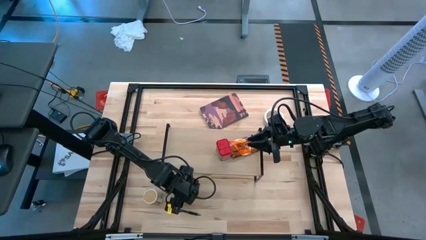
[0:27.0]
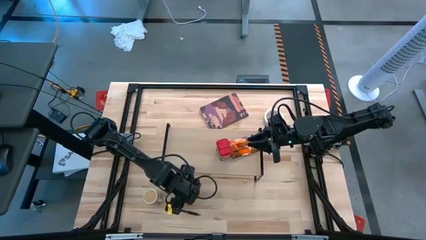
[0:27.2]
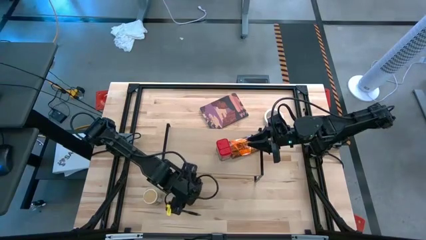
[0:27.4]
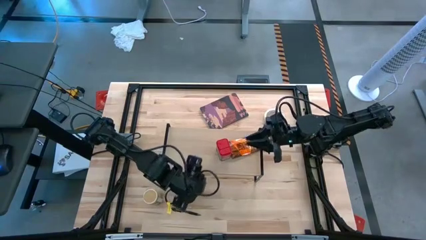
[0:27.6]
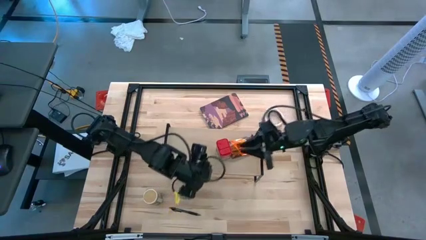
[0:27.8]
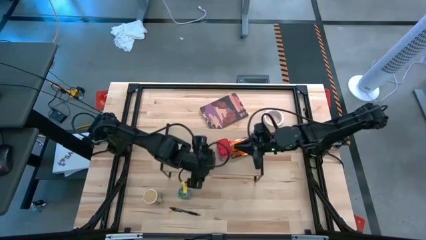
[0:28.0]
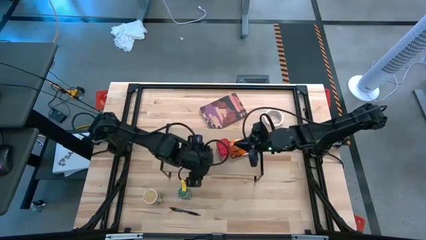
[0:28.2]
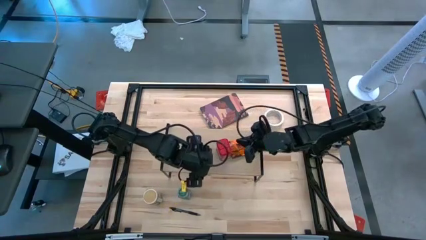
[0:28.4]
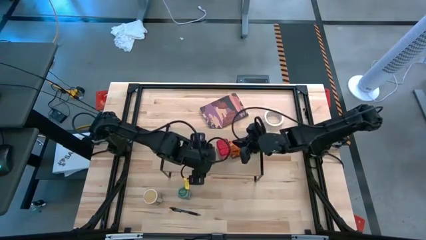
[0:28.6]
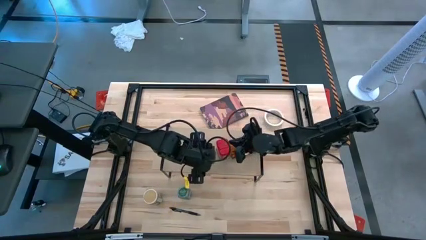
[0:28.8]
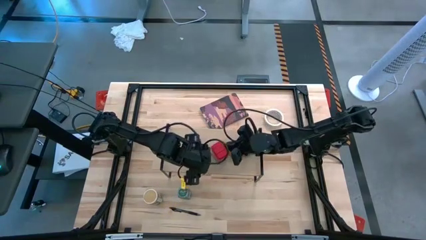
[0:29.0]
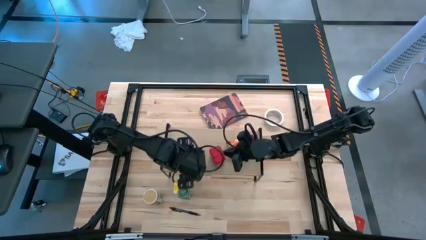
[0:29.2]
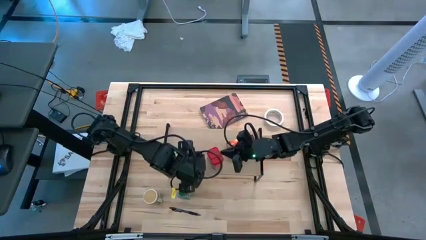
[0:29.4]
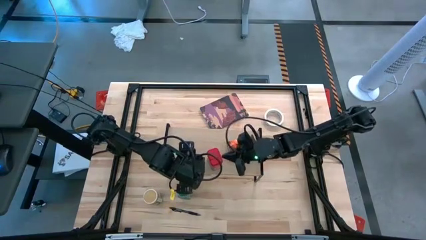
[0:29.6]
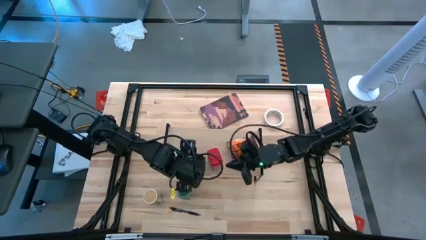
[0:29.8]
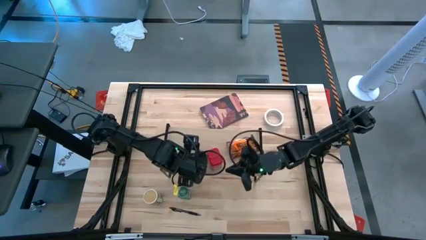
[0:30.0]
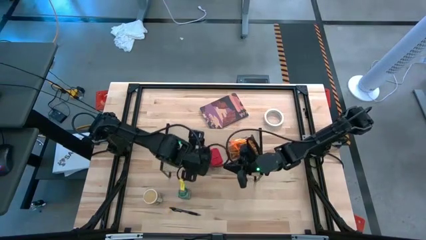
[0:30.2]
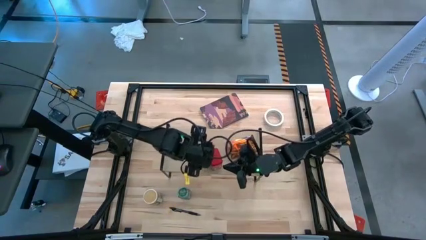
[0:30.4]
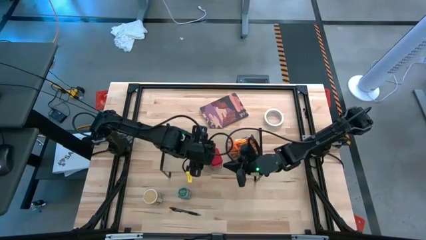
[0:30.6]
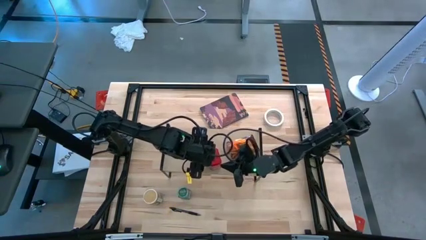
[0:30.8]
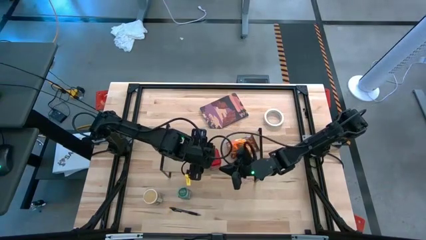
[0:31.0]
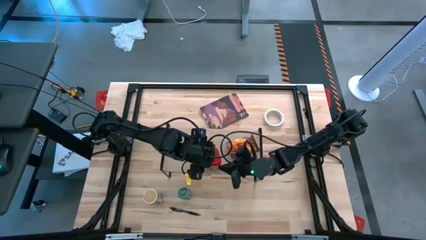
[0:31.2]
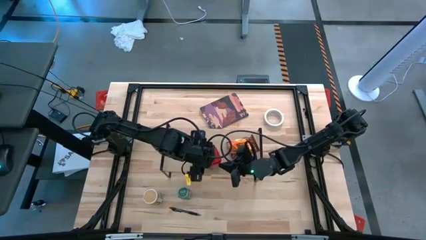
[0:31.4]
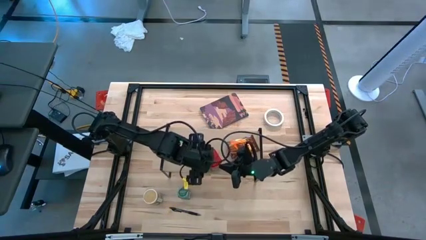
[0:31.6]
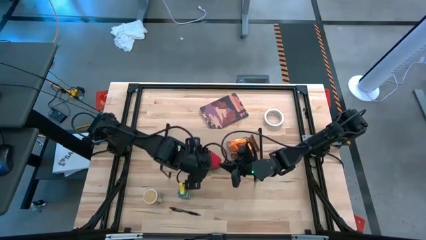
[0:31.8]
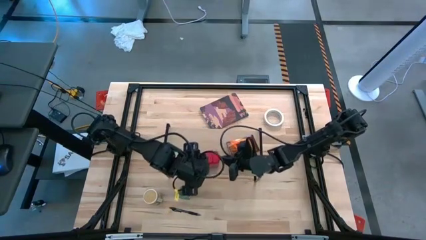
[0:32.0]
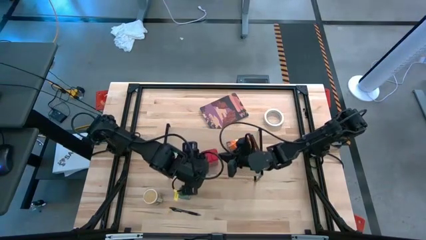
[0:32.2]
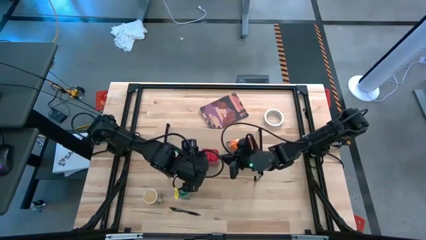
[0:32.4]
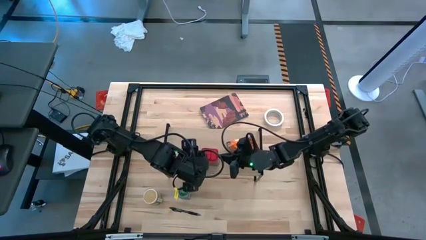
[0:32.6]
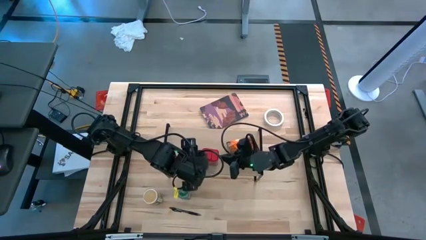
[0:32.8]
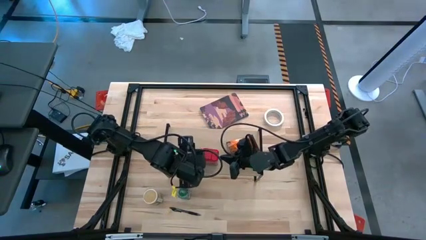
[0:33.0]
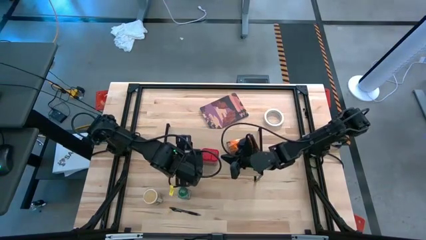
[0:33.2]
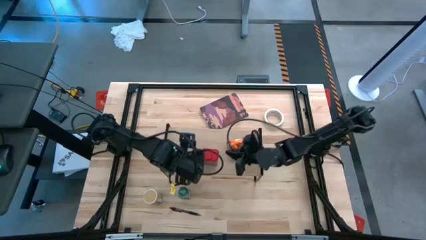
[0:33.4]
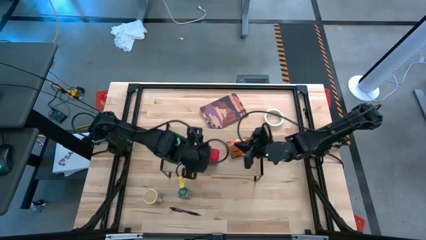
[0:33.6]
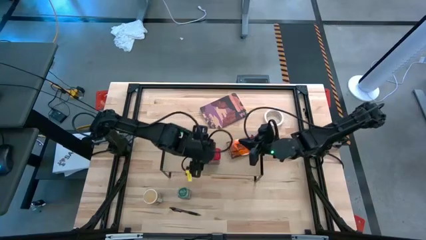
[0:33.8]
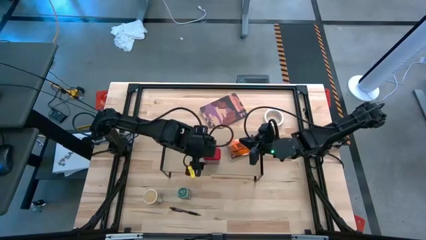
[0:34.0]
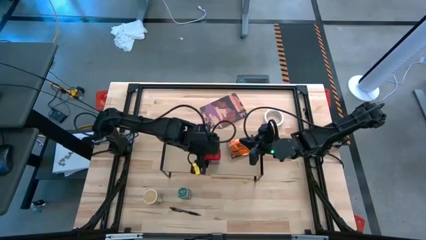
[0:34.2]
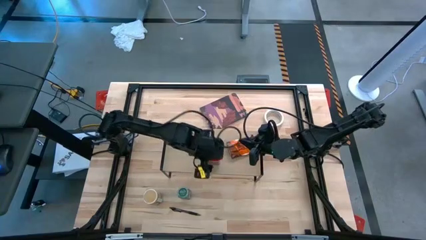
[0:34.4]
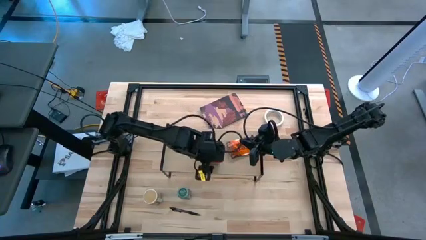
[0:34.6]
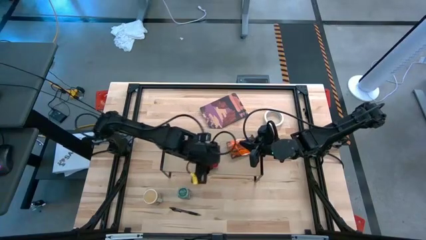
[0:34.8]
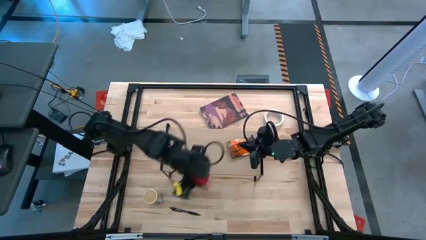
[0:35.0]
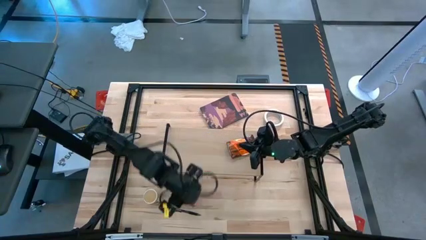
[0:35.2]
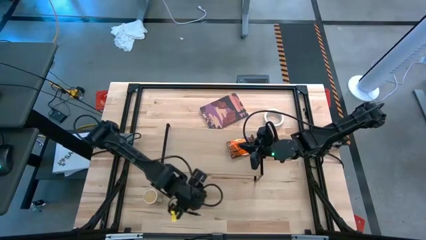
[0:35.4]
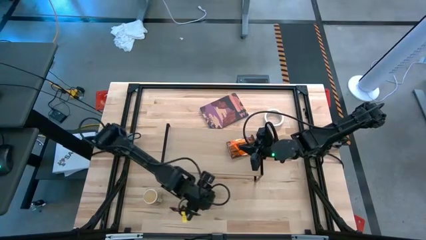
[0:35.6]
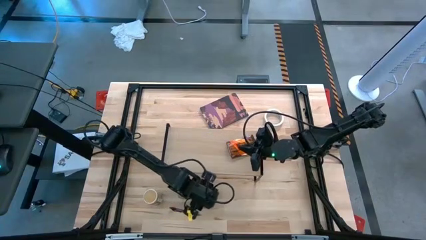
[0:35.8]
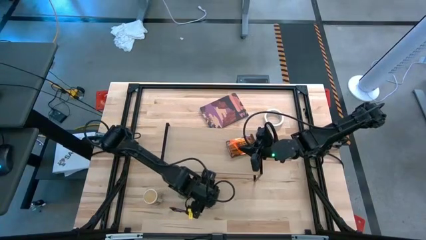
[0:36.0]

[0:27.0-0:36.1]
Task: Shelf spices
Remove the red seasoning can from the shelf

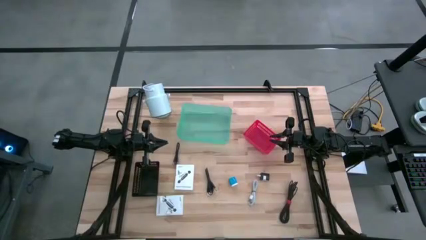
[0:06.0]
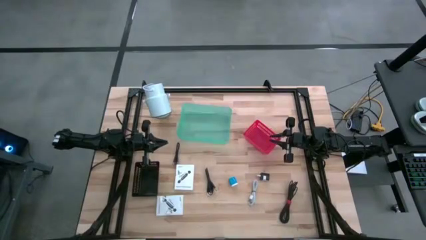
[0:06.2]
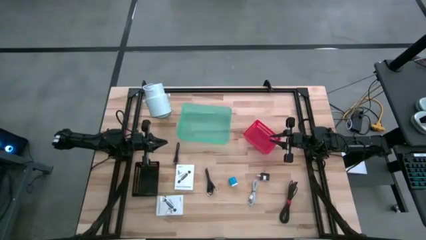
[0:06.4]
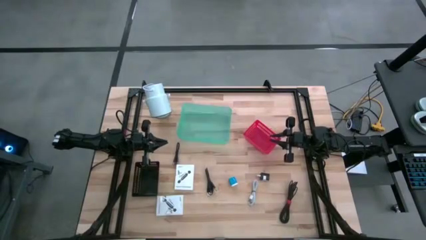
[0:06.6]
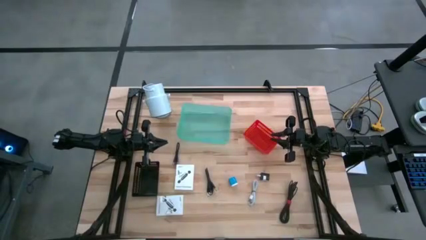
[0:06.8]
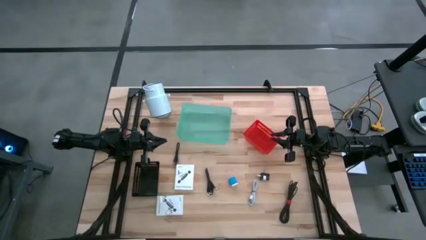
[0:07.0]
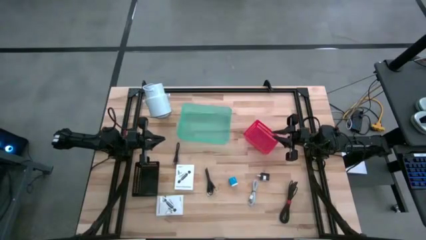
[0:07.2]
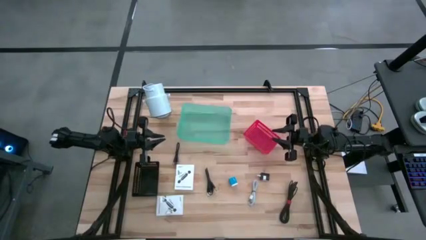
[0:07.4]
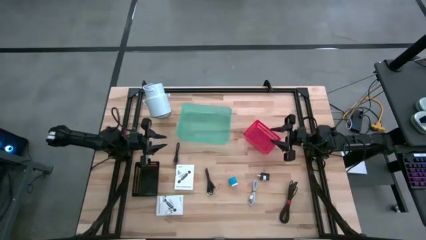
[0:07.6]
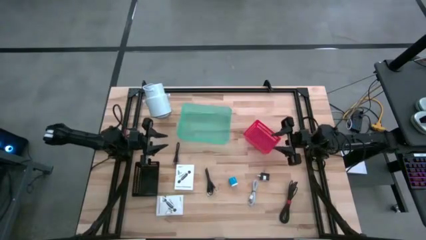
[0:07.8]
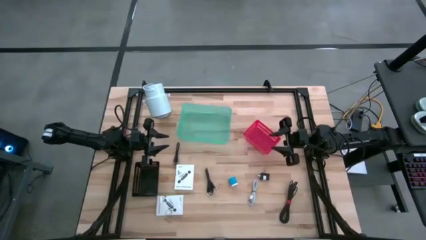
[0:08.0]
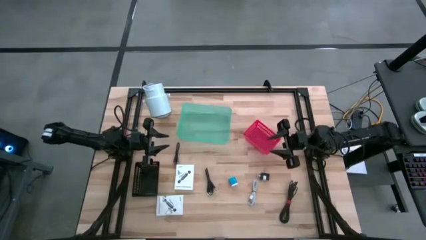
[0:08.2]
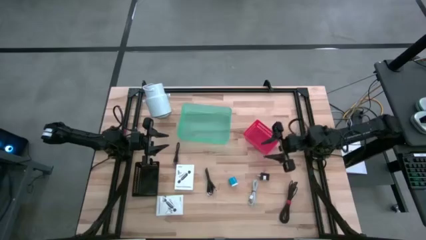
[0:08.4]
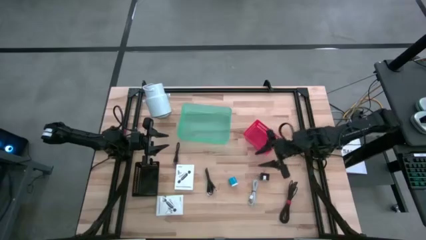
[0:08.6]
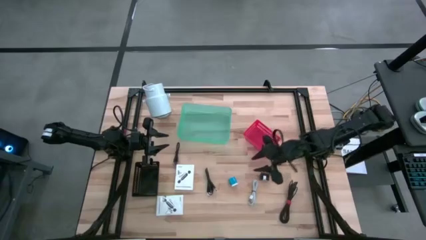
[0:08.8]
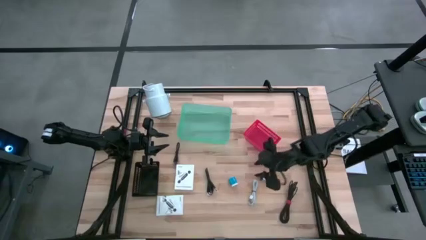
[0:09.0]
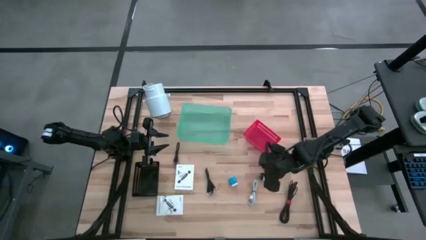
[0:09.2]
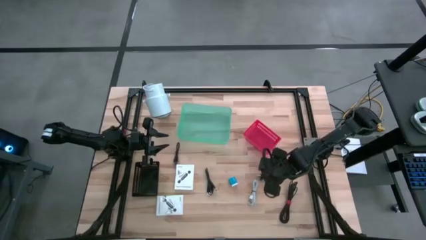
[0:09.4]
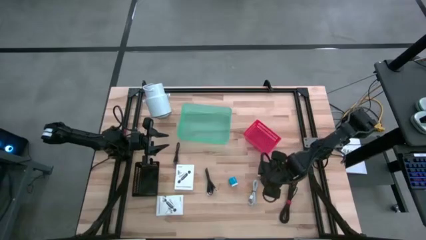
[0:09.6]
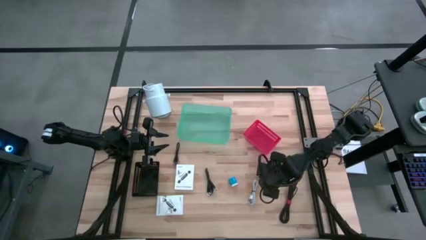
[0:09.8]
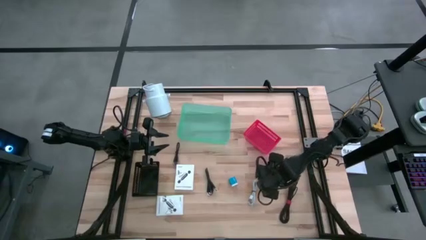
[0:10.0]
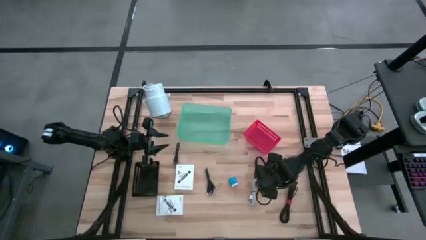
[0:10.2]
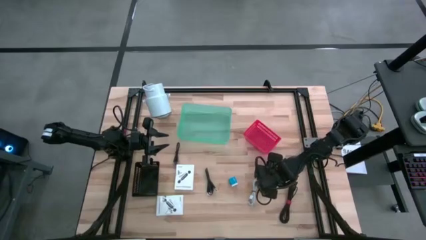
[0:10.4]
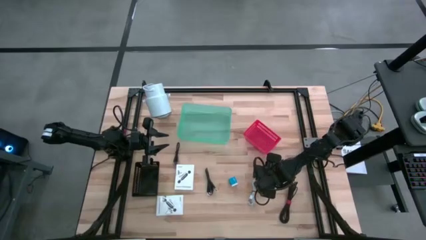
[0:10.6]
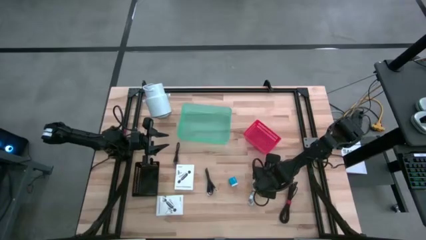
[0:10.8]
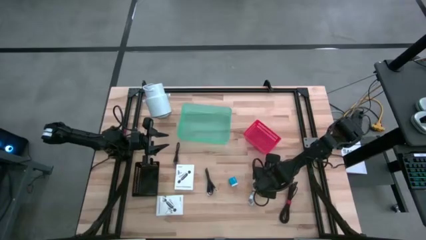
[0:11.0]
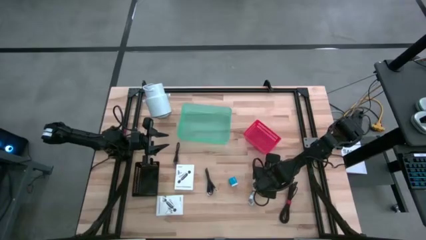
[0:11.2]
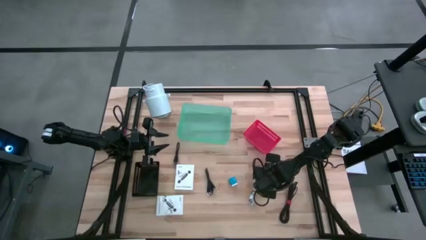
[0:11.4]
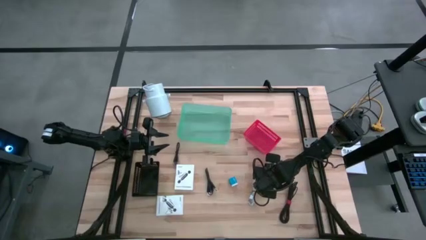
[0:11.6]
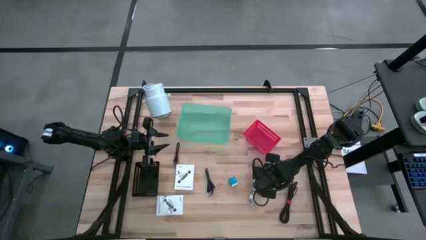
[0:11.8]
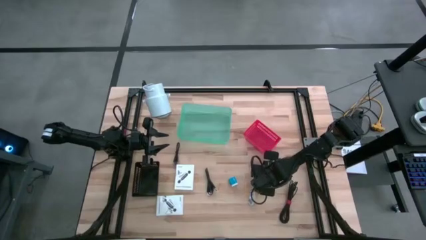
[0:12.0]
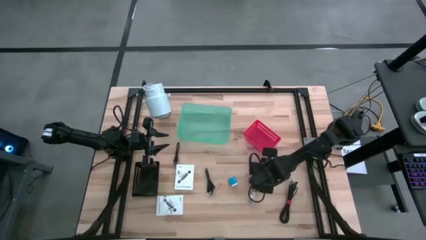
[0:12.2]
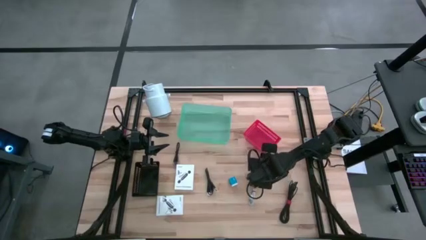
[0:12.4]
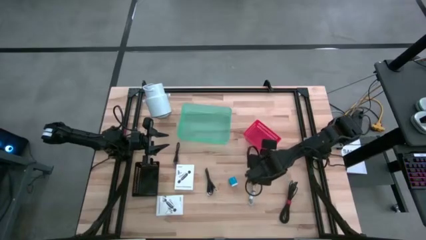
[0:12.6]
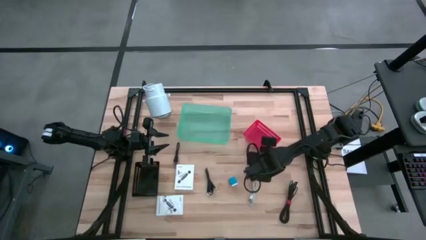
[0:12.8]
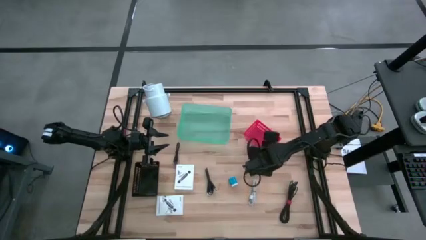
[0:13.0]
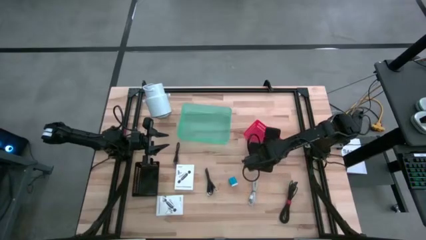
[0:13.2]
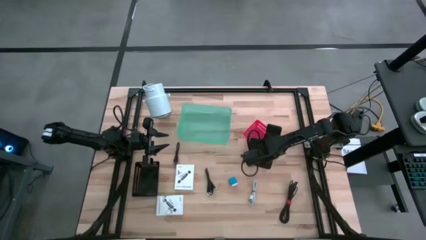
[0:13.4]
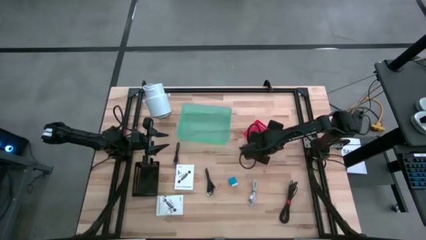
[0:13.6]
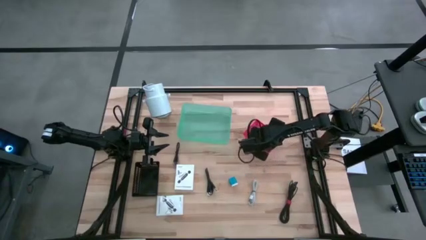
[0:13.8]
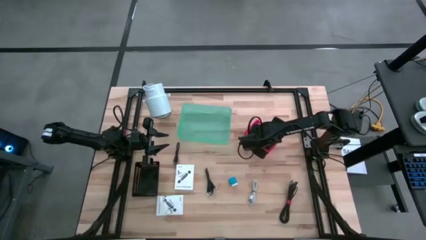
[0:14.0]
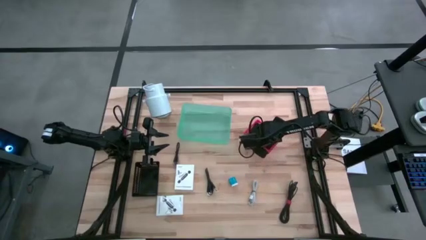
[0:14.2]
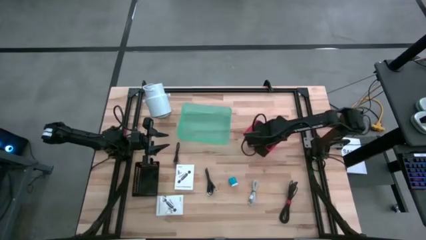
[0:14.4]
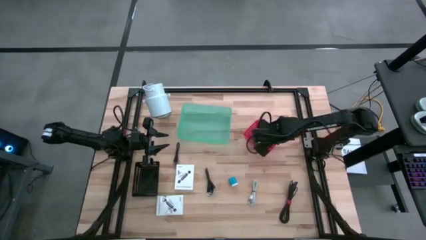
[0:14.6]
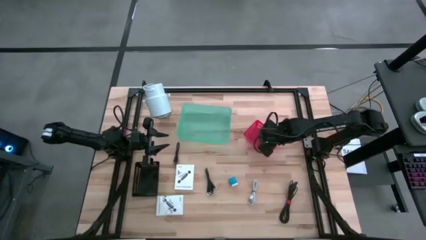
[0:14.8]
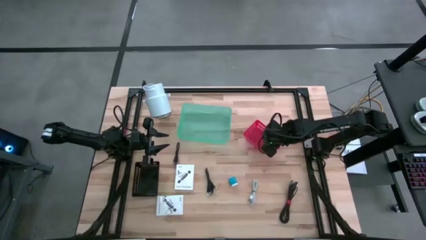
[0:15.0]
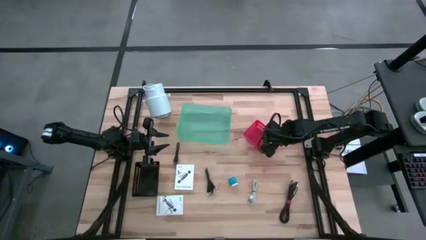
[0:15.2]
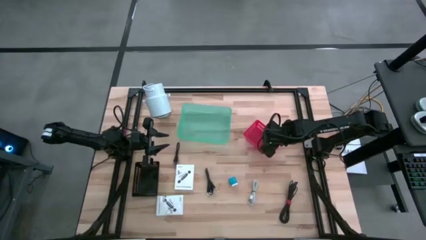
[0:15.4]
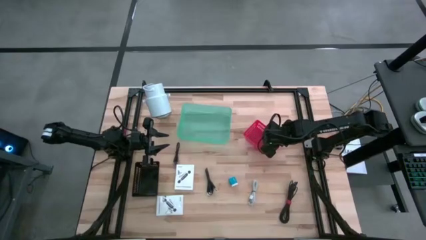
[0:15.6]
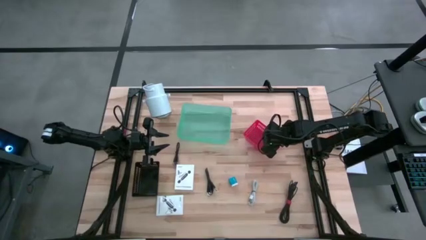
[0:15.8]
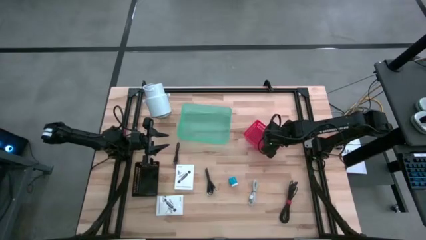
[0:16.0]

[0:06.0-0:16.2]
Task: Pick and place items into bin
Put the black charger adapter into the red bin
